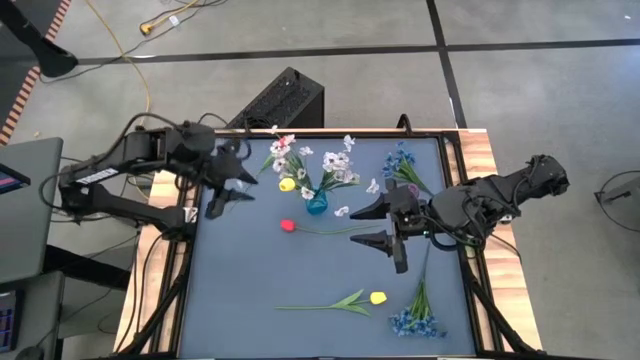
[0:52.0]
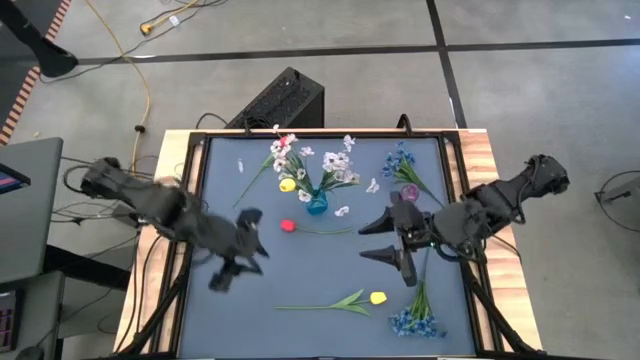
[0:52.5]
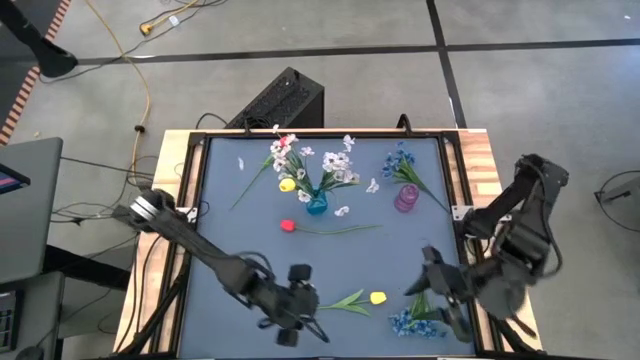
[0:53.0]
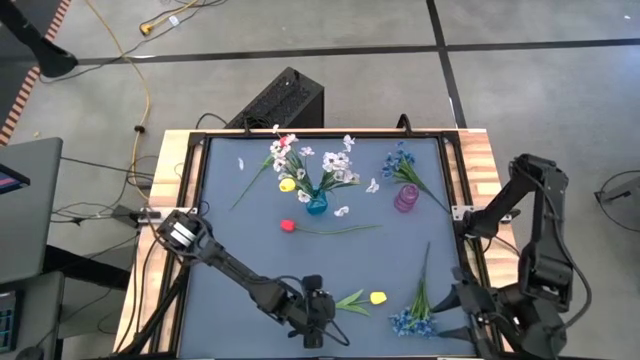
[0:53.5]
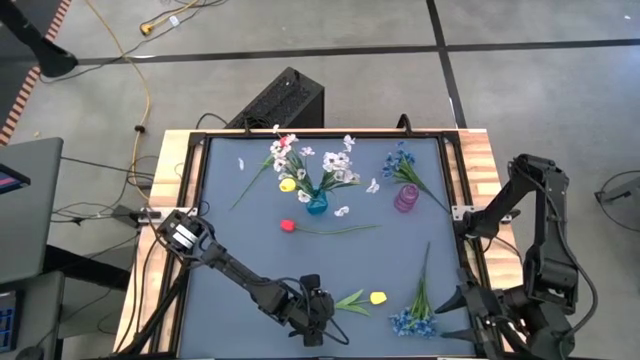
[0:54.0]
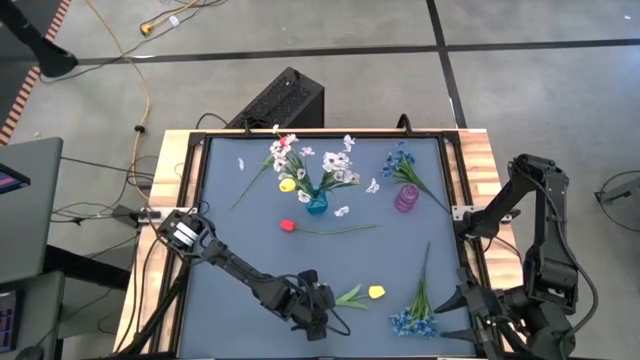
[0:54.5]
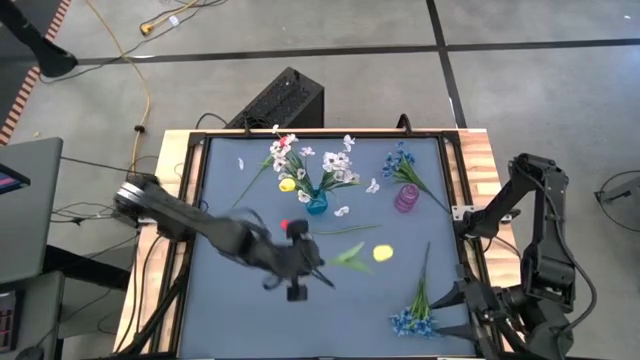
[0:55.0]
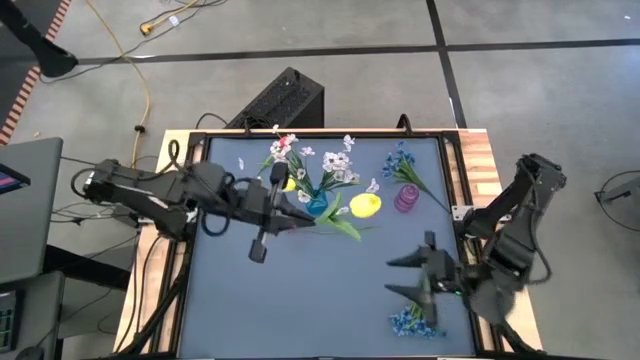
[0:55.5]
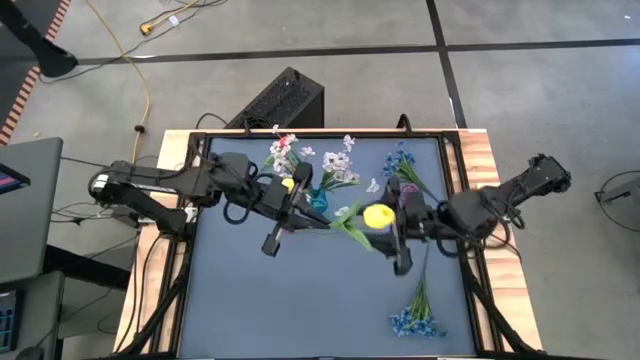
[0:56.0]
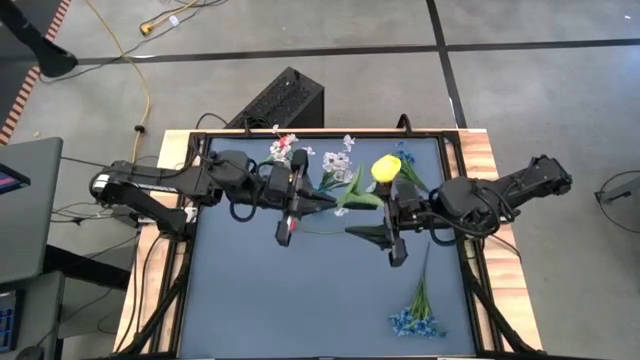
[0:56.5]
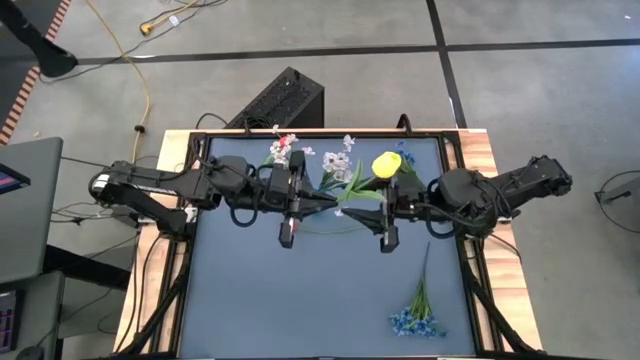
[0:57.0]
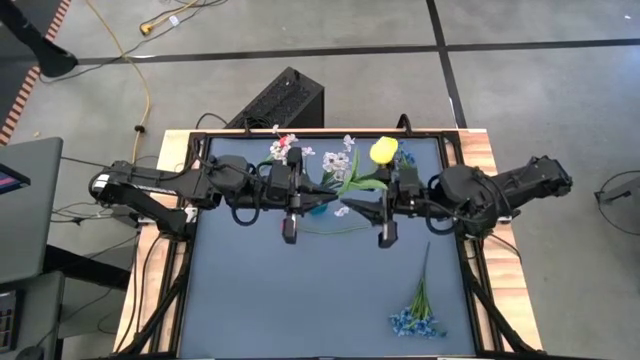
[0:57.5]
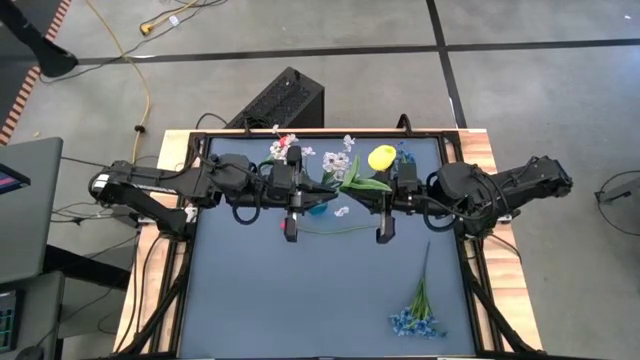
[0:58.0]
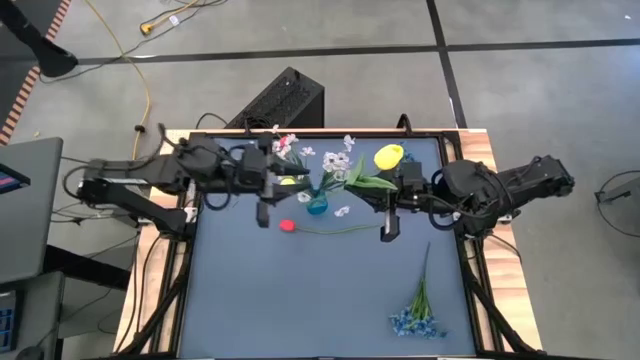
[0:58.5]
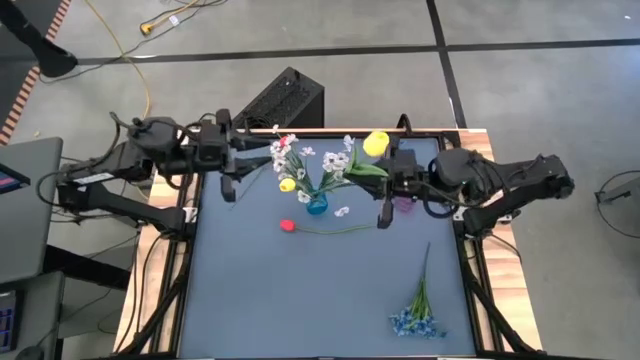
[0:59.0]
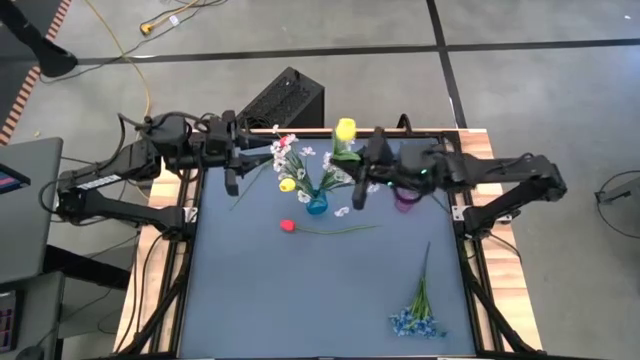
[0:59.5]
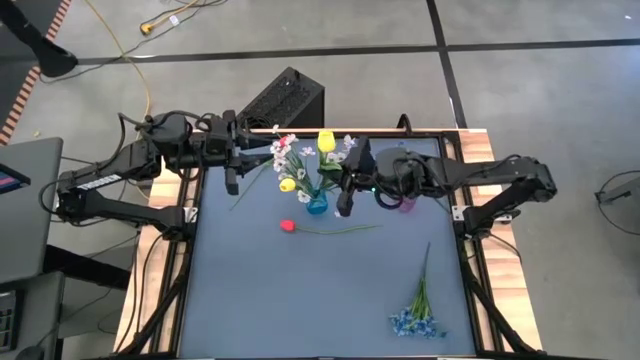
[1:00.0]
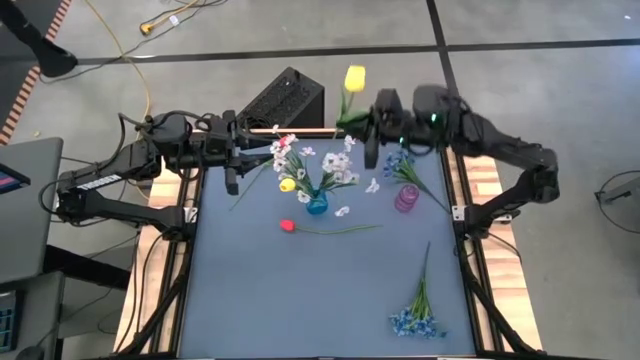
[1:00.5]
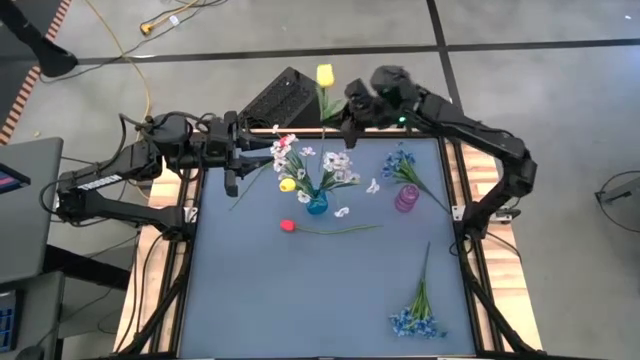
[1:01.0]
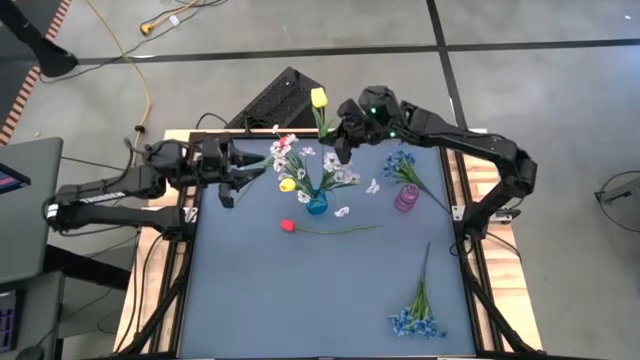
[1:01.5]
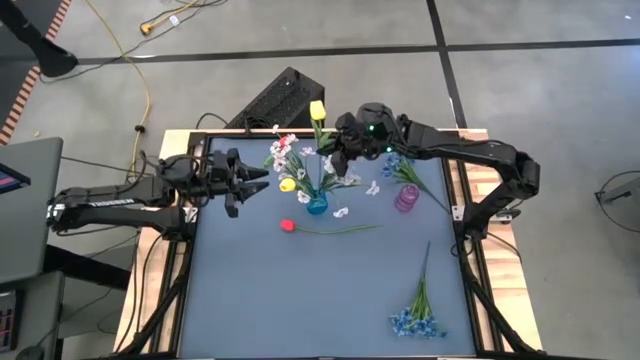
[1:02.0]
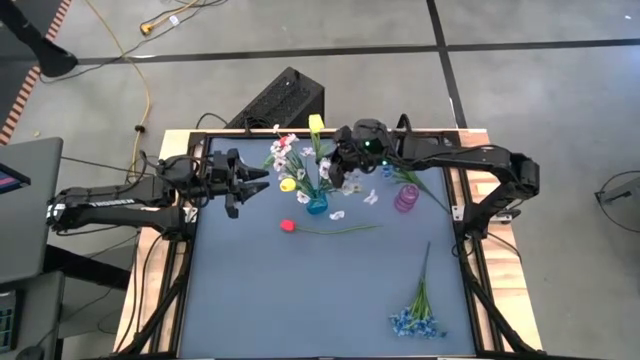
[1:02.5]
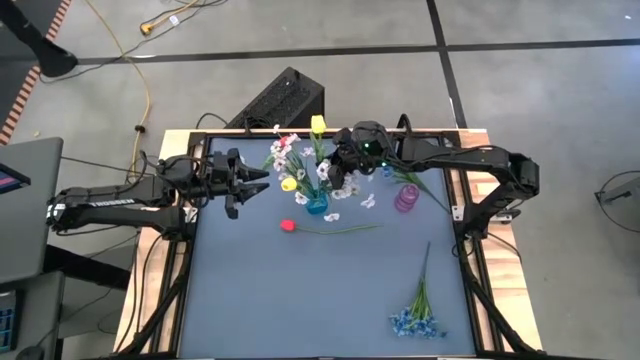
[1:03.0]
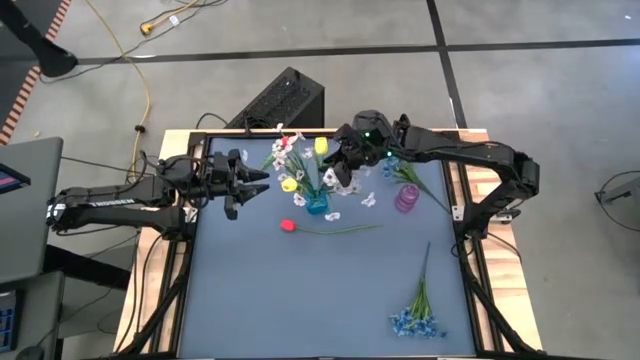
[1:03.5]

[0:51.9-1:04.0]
Task: Sort flowers into vase by color
Put the yellow flower into the blue vase

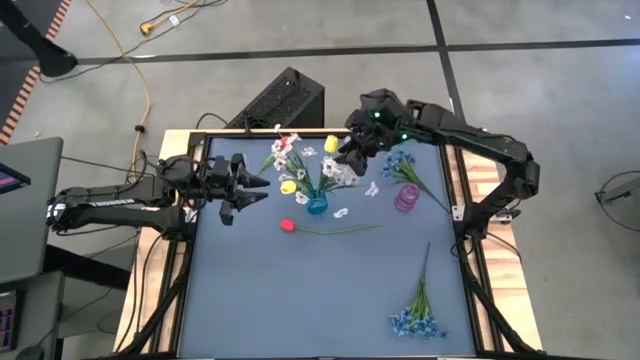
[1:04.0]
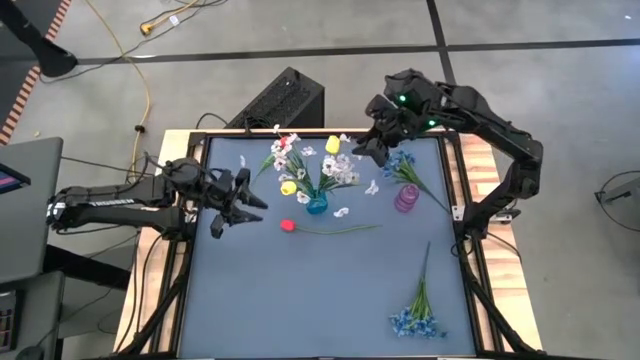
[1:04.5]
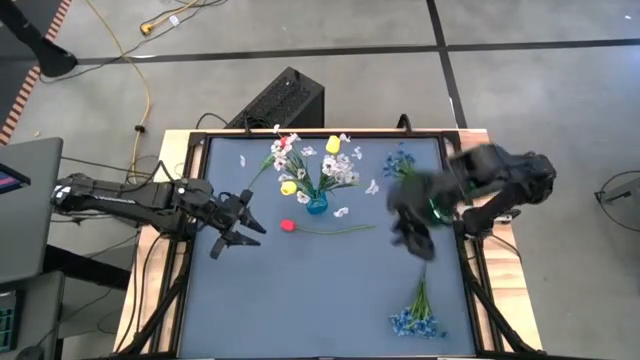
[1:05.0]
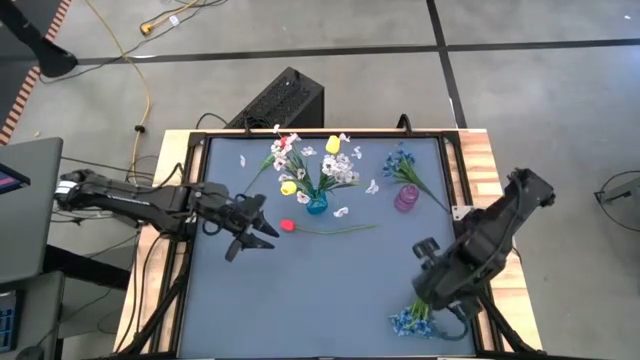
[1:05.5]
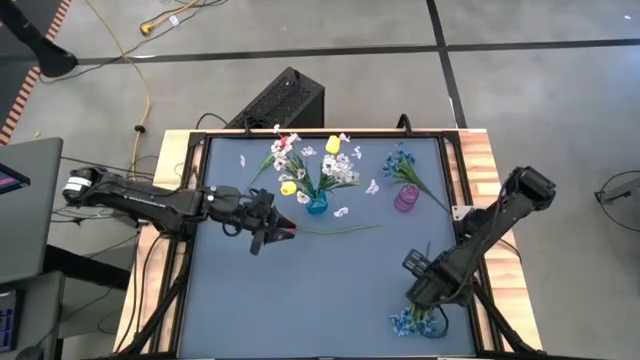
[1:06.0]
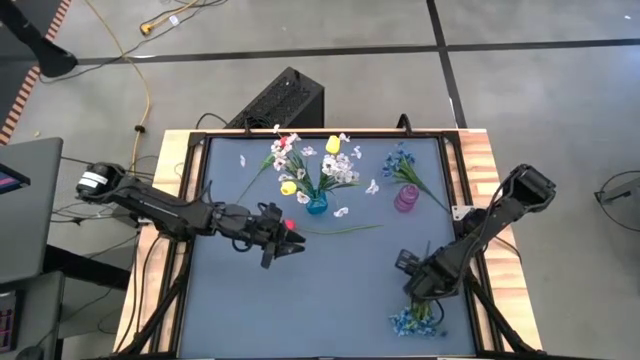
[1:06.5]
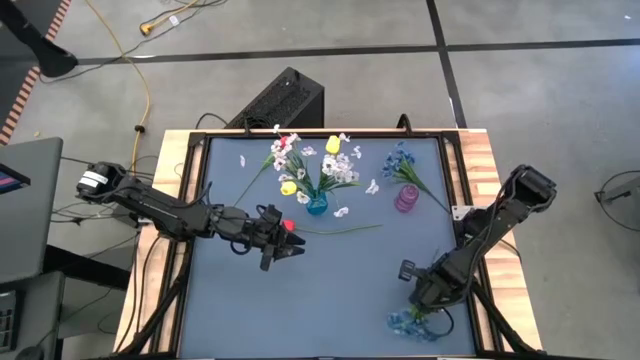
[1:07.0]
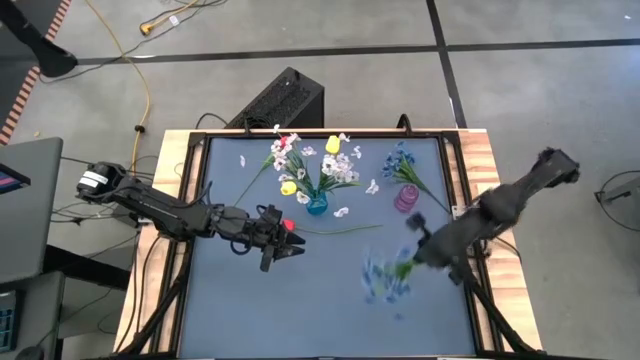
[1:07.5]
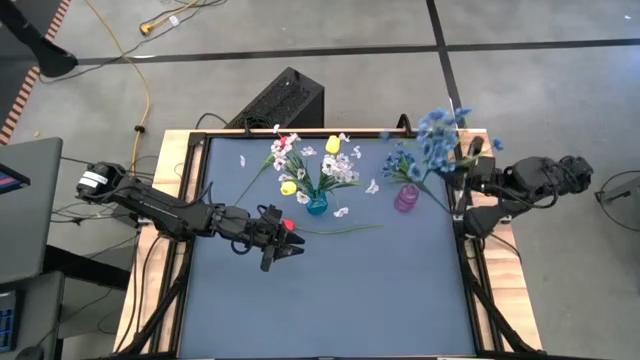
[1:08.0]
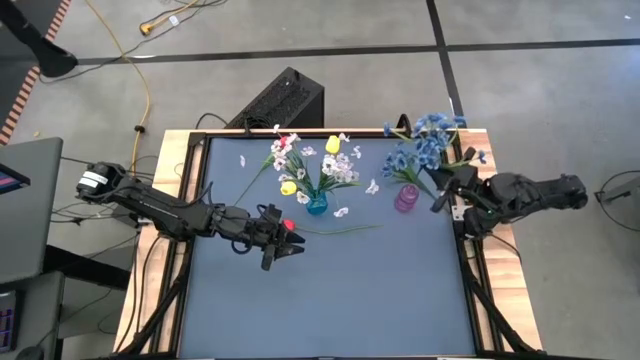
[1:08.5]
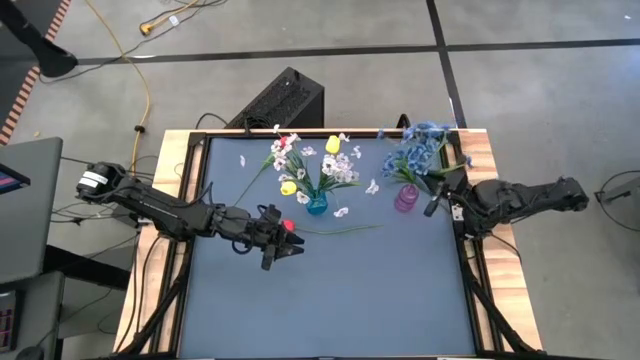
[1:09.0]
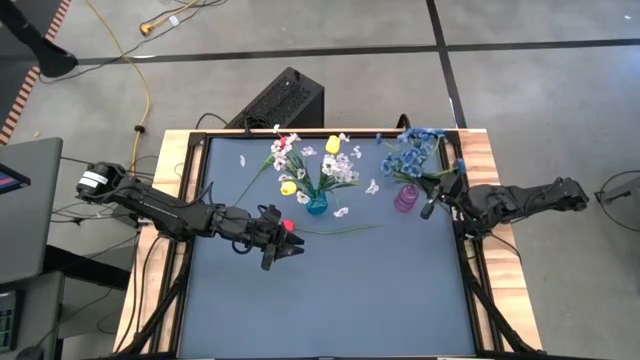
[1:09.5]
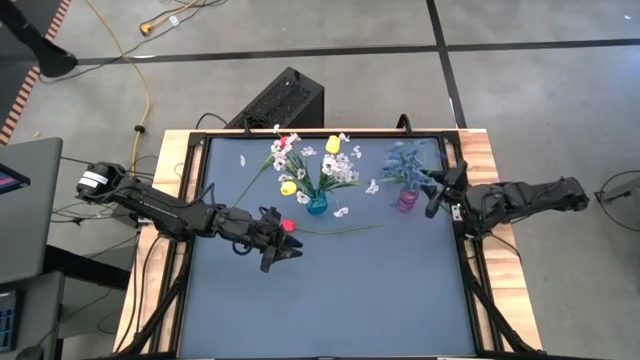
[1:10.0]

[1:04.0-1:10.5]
Put the bottom blue flowers into the violet vase
